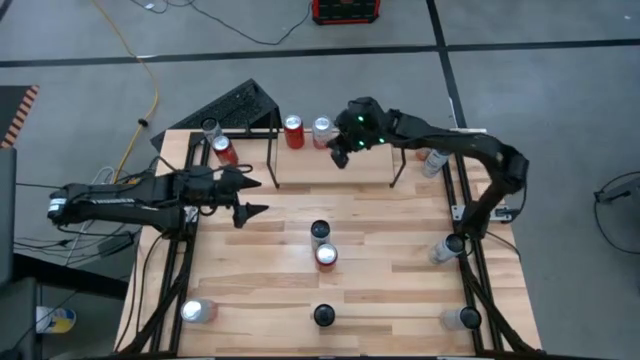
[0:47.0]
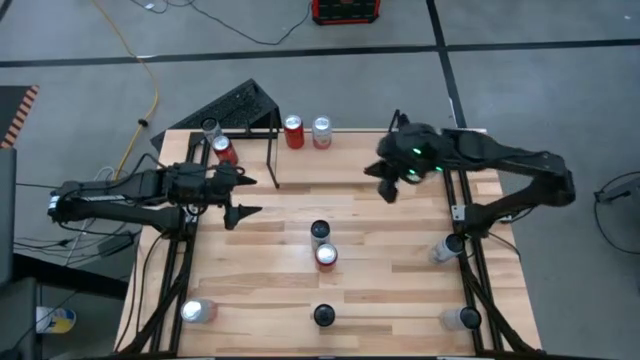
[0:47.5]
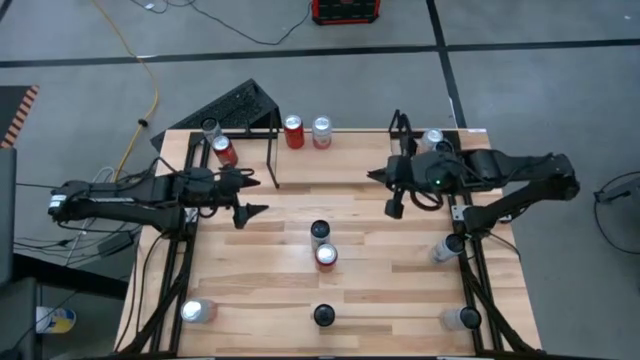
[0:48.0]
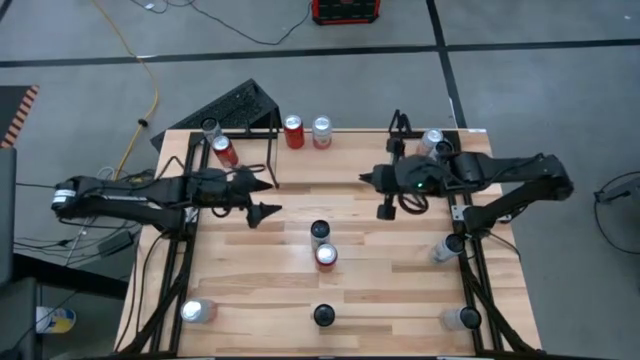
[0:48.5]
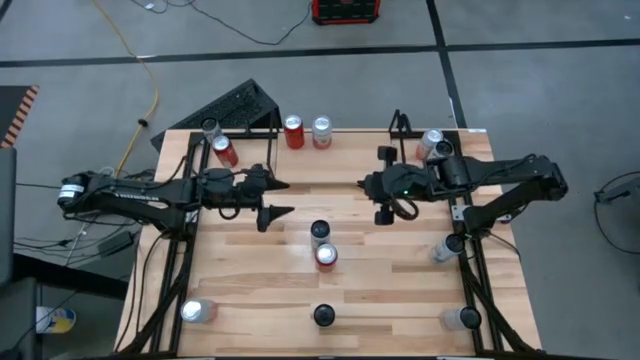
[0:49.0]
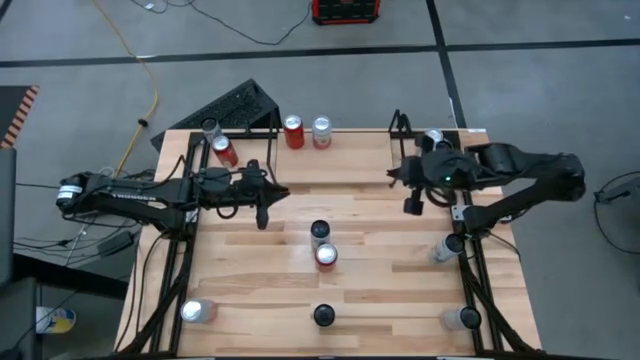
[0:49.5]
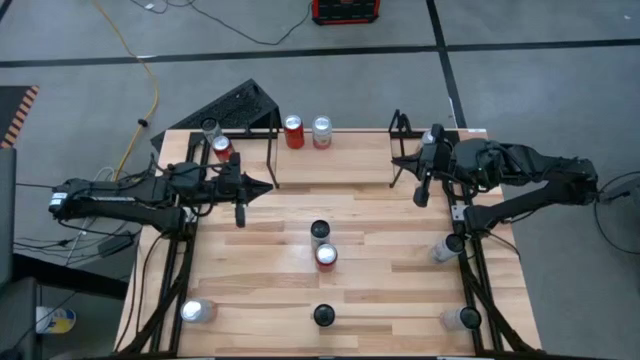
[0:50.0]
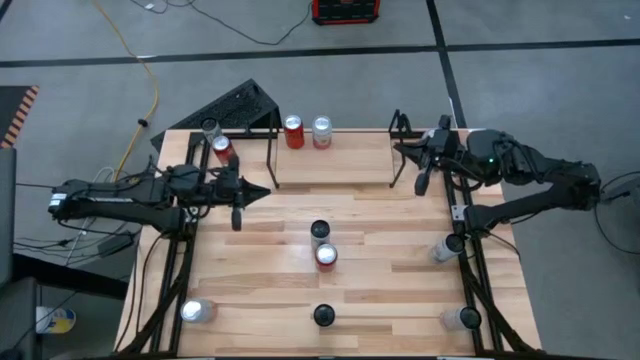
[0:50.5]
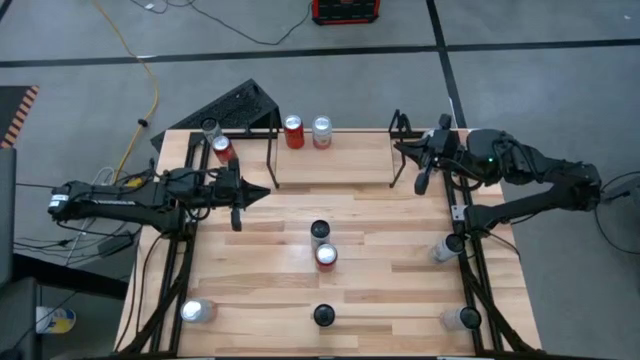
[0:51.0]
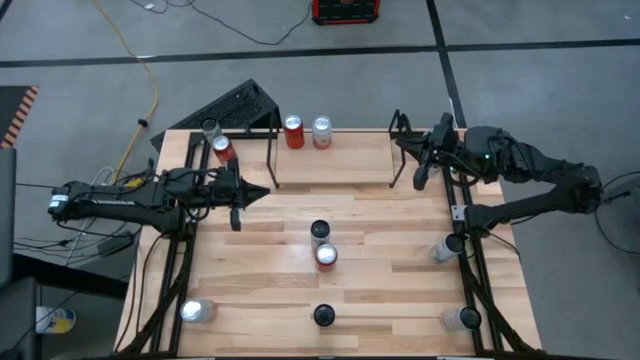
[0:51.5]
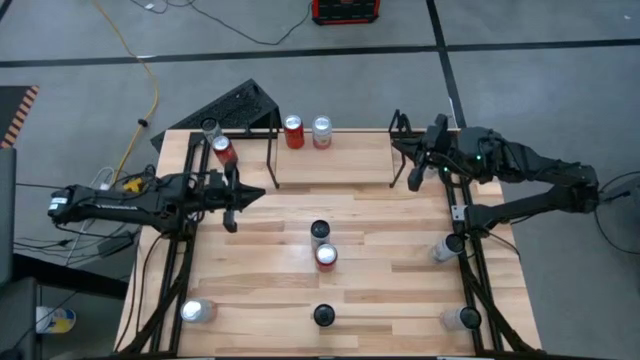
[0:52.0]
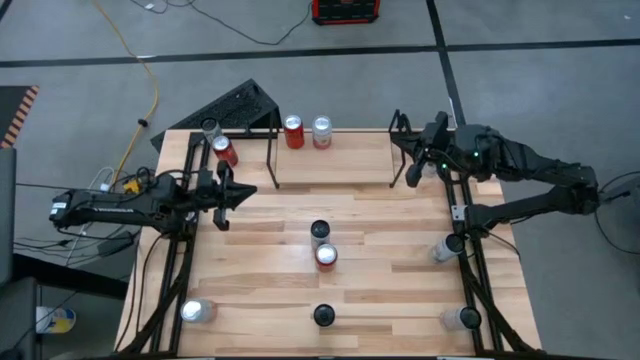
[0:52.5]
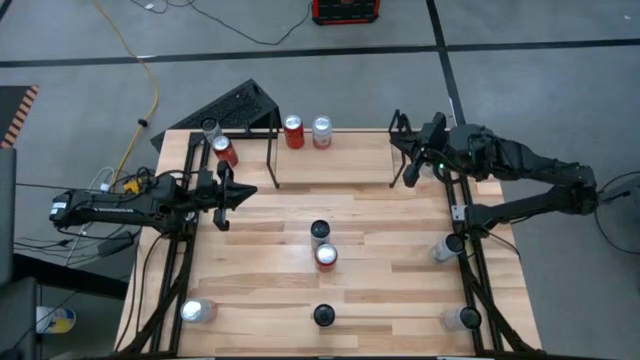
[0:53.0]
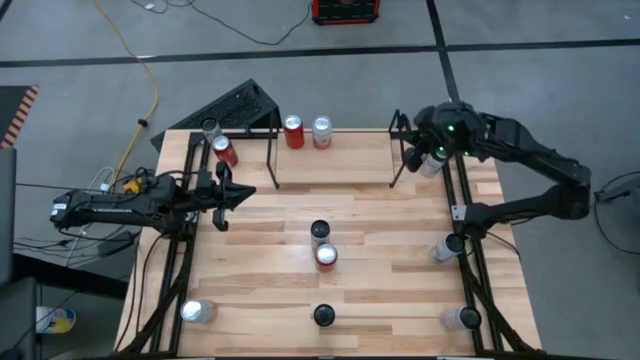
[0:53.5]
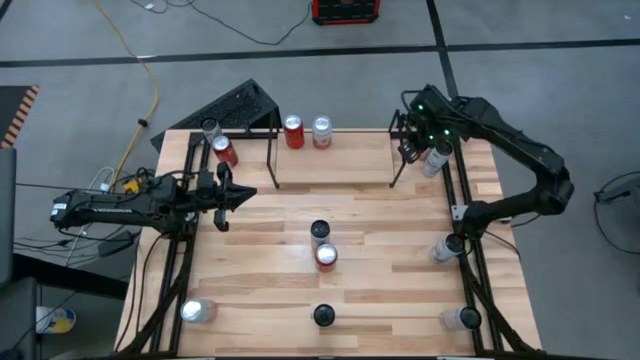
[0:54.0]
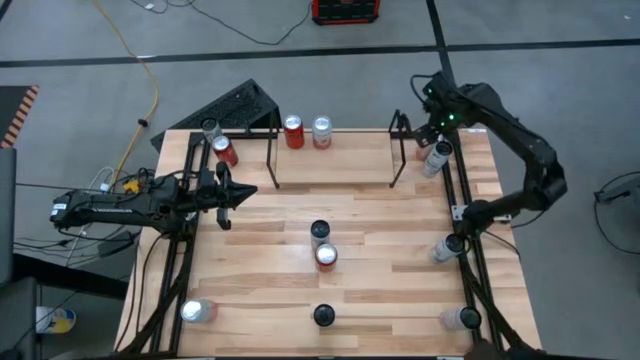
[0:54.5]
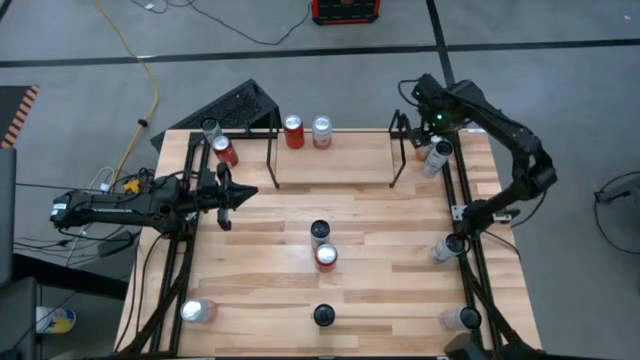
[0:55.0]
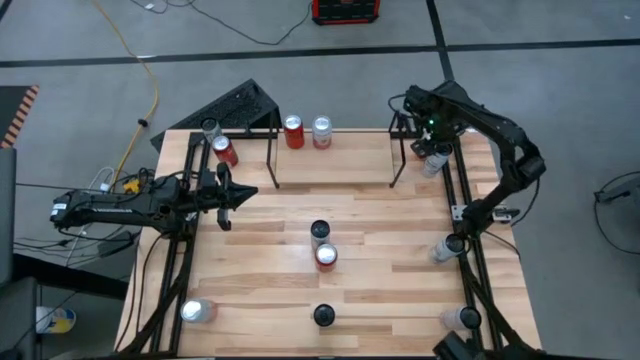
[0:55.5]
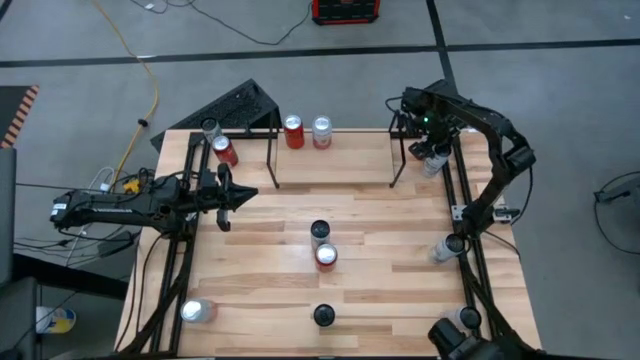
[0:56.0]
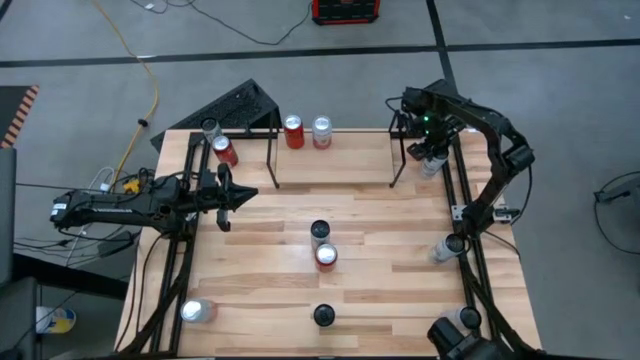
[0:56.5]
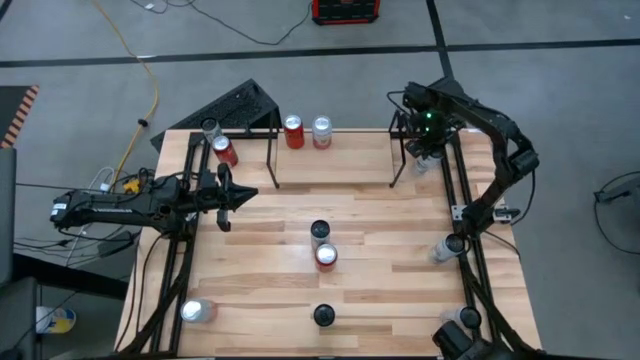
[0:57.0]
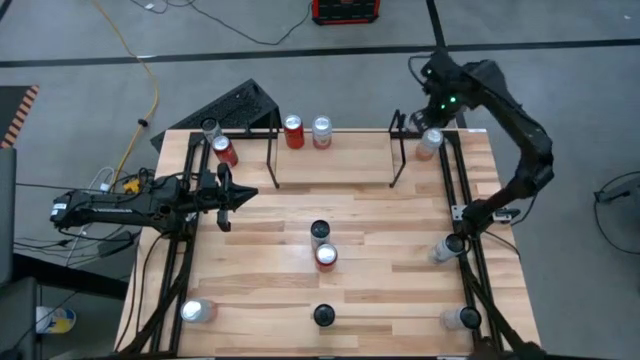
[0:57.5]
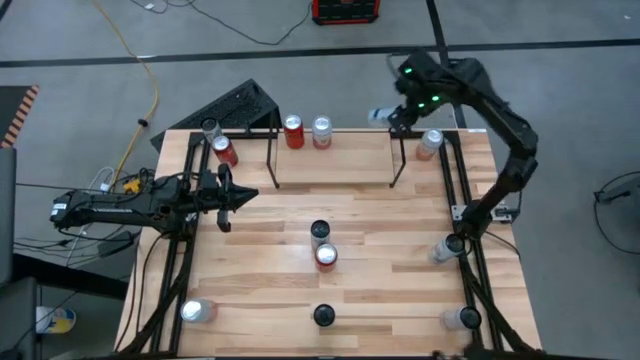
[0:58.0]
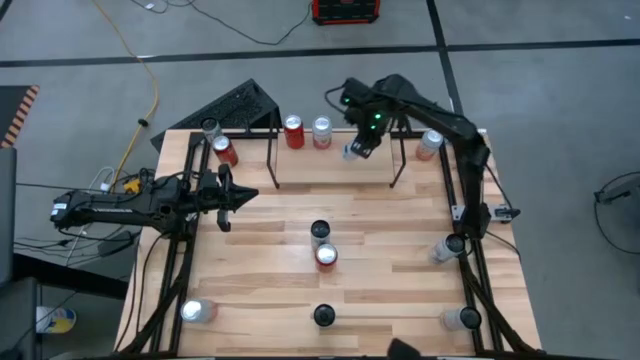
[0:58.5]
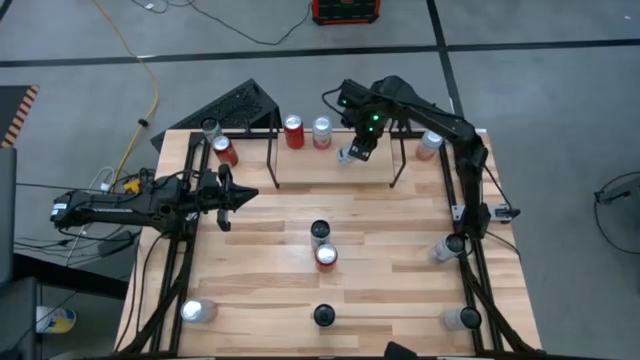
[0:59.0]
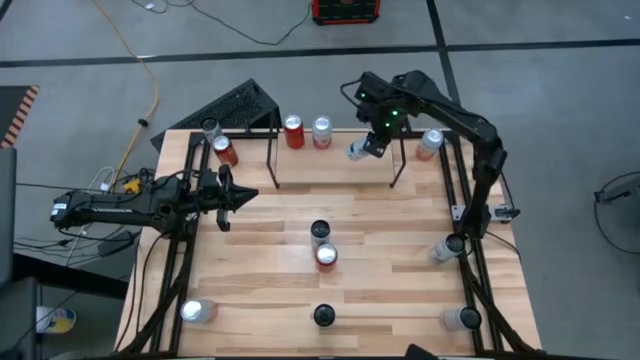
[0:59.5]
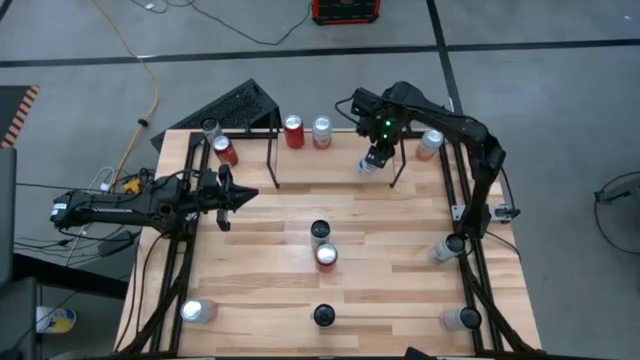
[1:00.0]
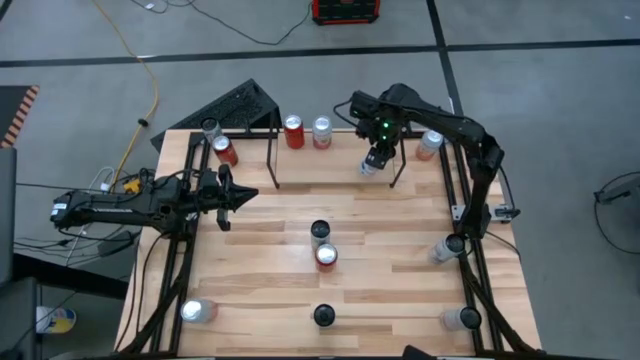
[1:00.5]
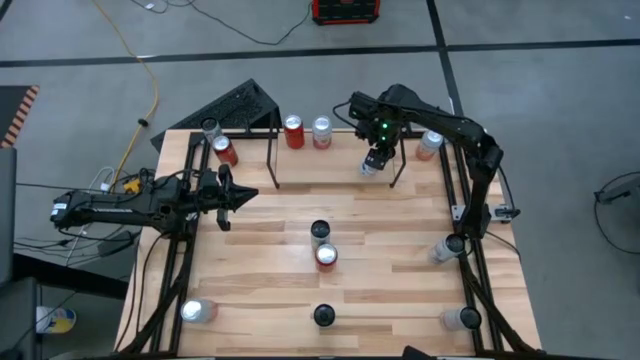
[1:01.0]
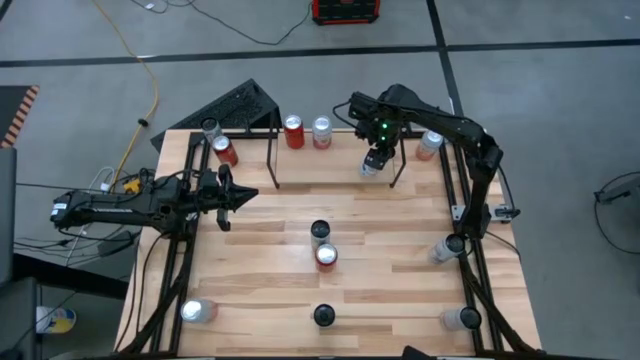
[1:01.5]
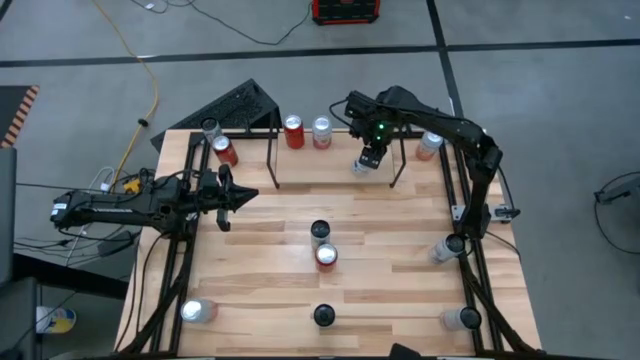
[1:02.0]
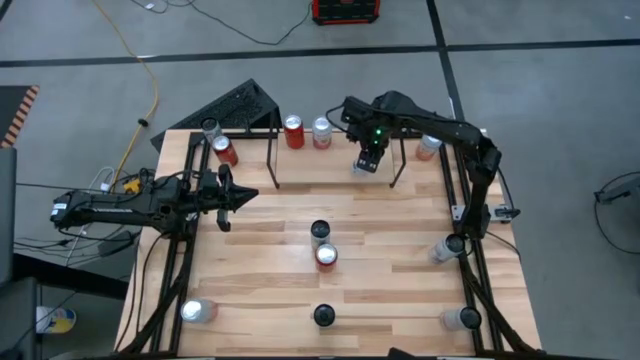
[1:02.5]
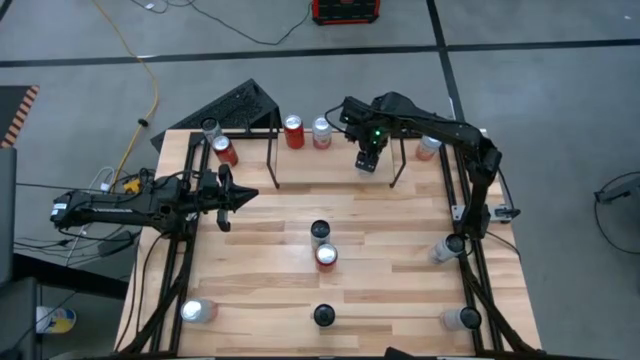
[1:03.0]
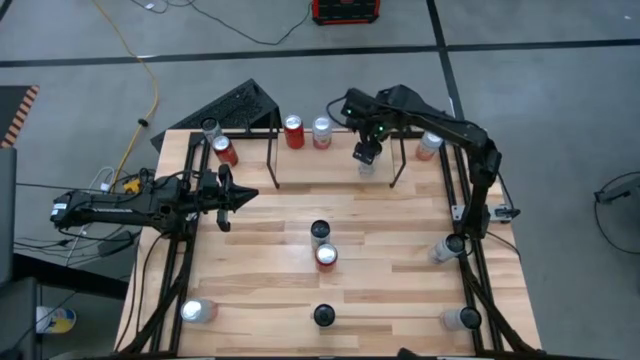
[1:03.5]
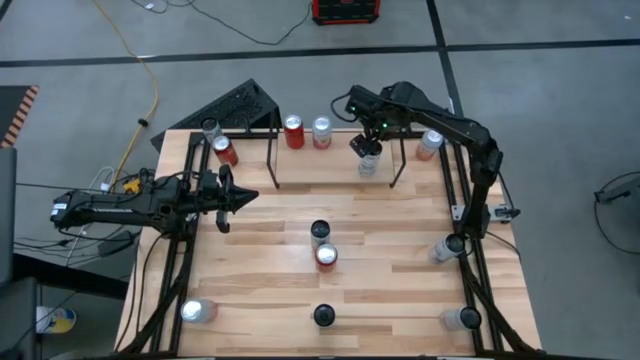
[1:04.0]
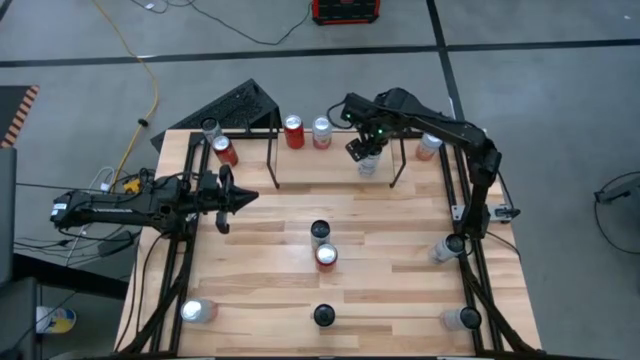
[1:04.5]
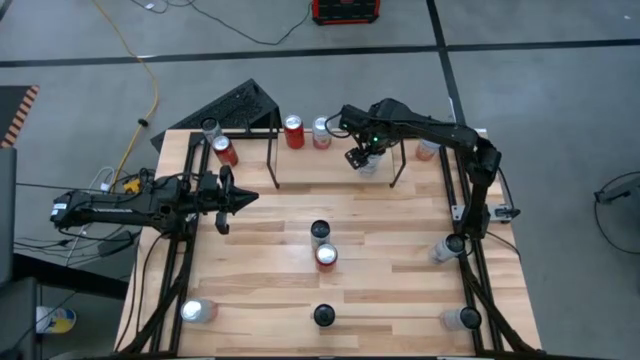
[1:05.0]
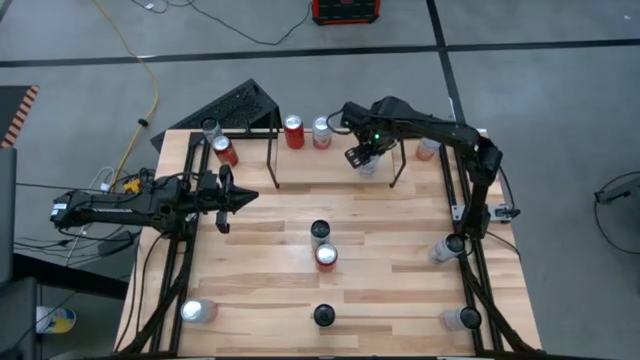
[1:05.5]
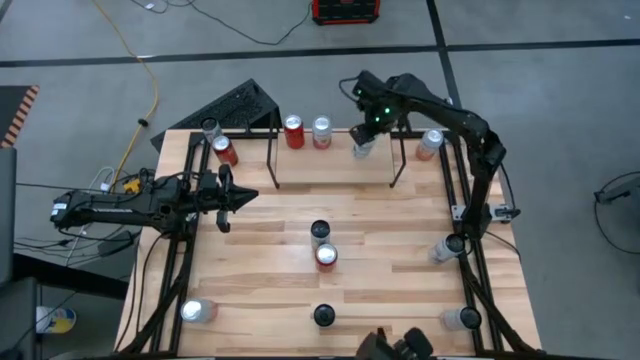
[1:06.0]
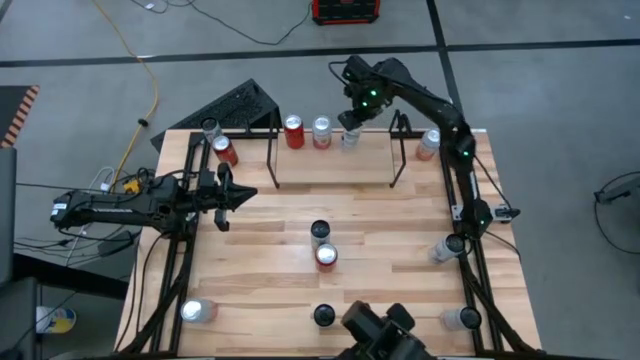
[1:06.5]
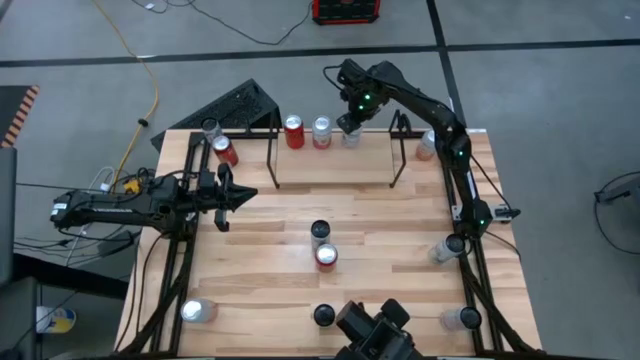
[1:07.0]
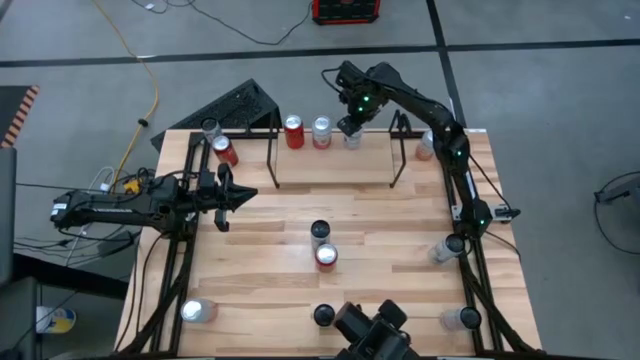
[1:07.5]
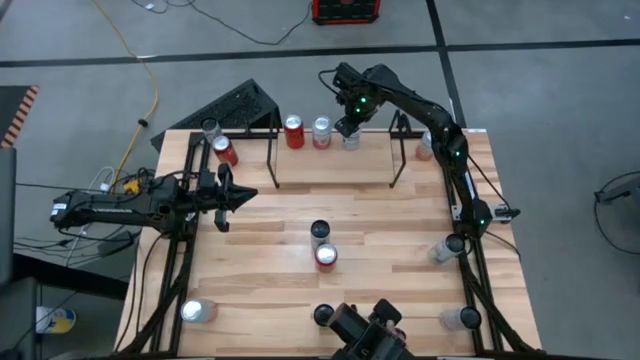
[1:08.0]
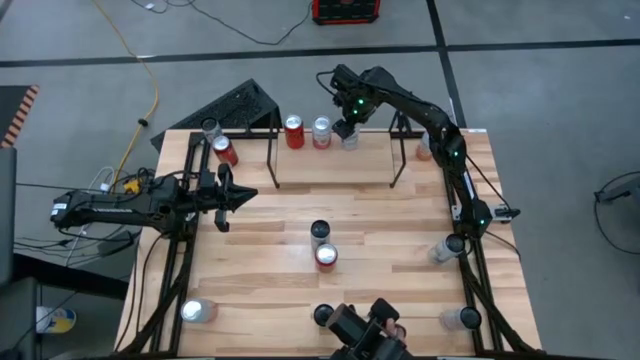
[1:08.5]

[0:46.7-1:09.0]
Task: Place canned beverage on shelf
Put the top right white blue soda can on the shelf
